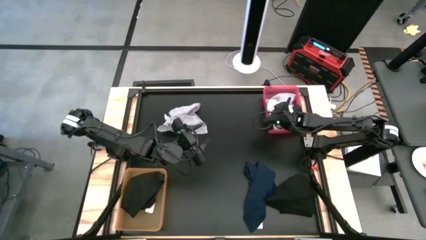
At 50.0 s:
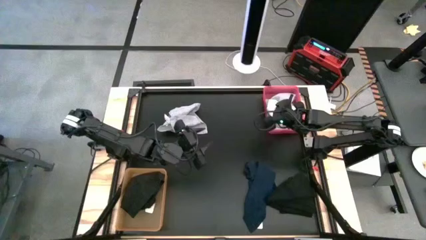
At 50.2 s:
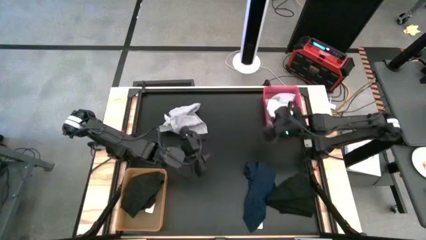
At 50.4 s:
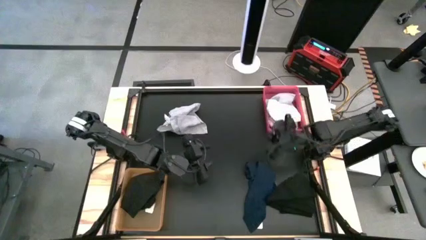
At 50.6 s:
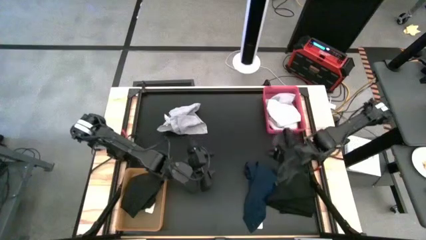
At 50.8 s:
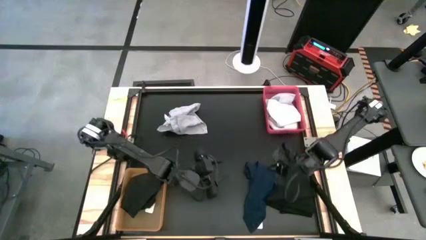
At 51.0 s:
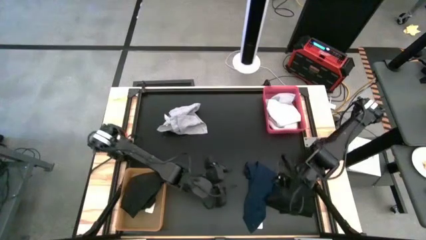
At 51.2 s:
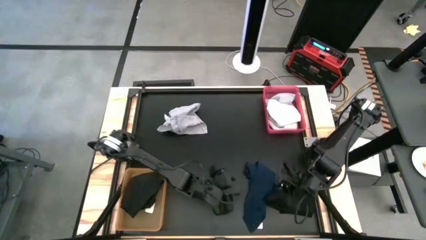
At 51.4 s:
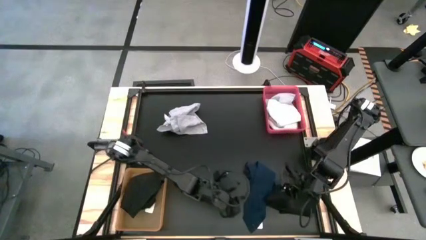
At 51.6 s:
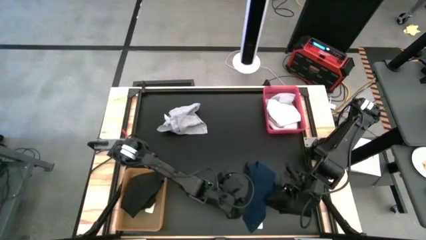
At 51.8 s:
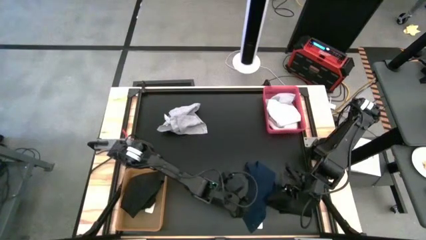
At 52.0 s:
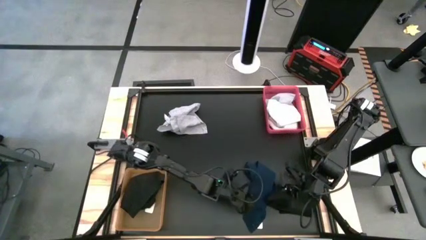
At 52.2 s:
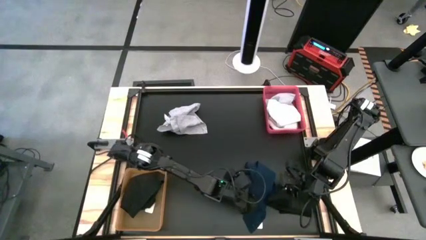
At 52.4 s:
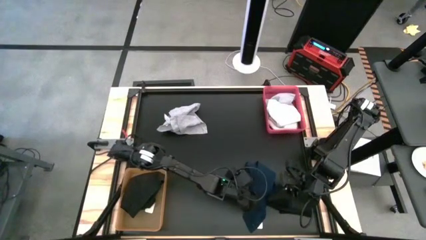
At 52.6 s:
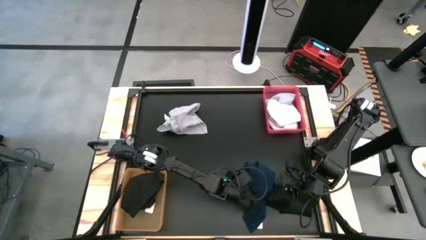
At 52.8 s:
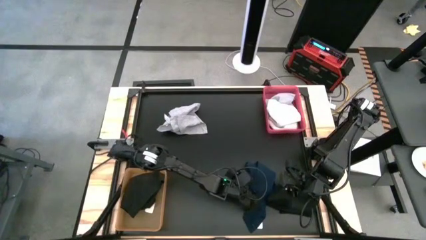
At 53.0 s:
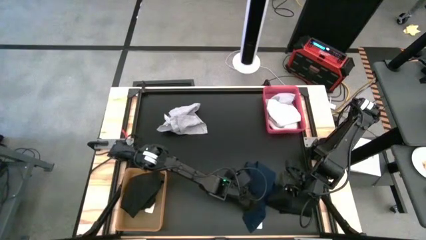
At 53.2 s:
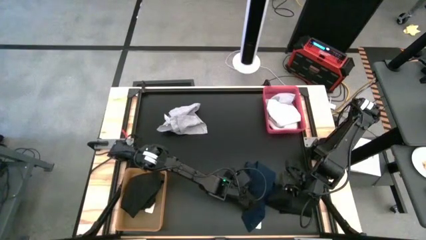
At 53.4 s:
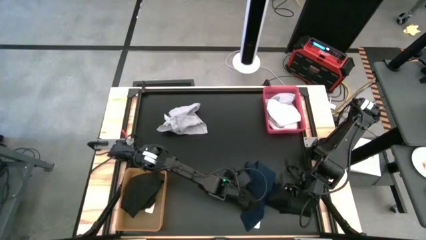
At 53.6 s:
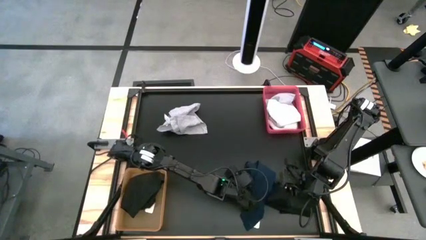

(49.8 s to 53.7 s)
Task: Sort towels by color in basket
Put the dark blue kitchen towel into the orange bin

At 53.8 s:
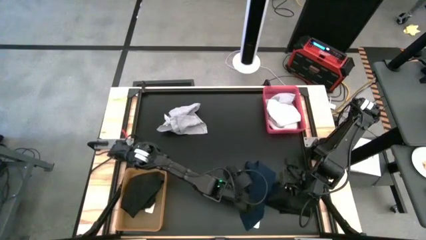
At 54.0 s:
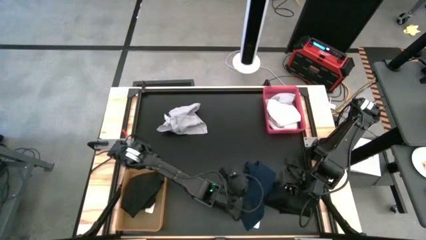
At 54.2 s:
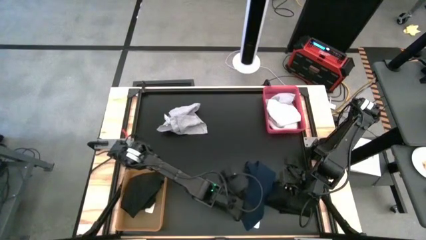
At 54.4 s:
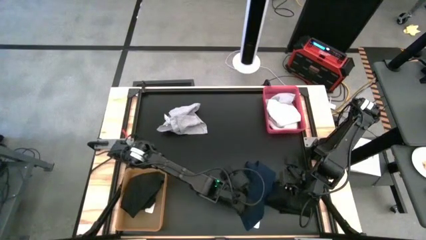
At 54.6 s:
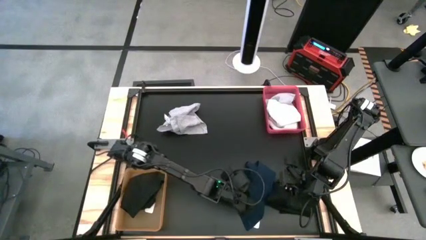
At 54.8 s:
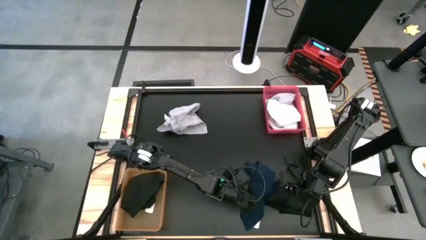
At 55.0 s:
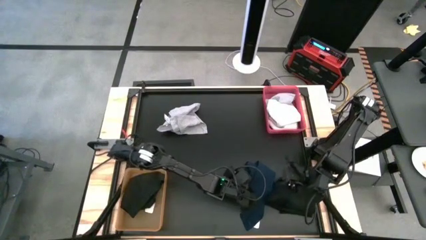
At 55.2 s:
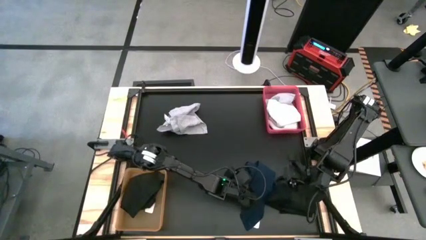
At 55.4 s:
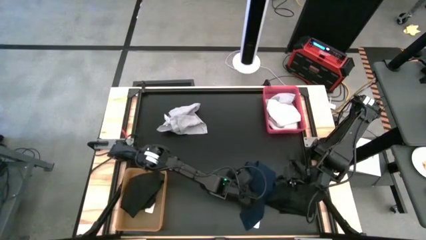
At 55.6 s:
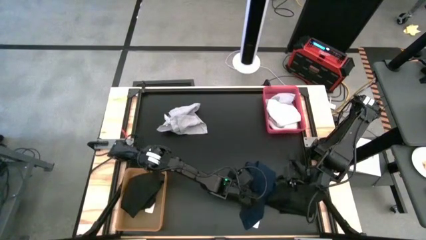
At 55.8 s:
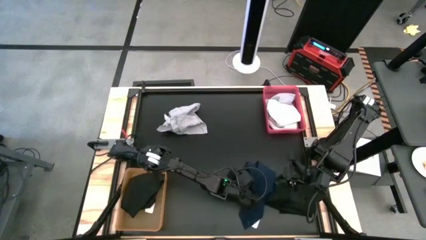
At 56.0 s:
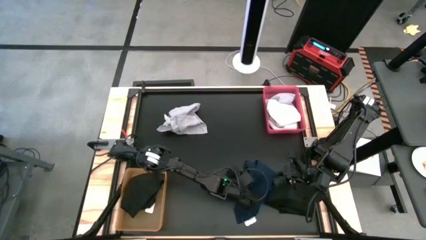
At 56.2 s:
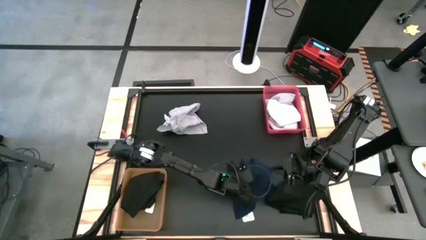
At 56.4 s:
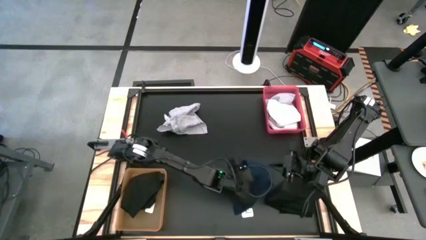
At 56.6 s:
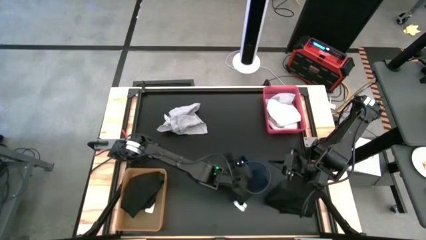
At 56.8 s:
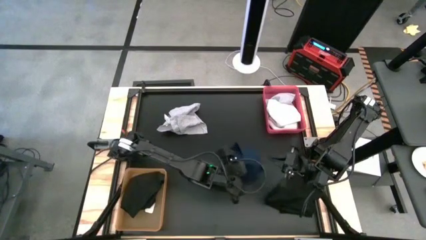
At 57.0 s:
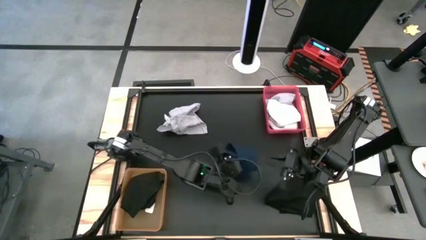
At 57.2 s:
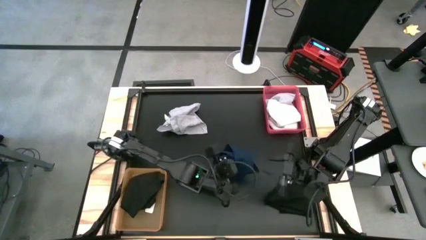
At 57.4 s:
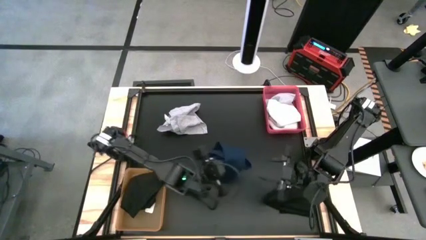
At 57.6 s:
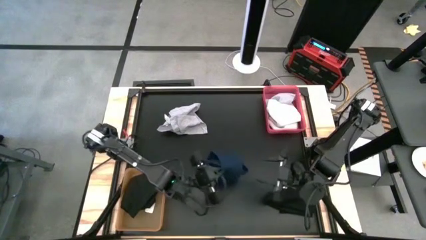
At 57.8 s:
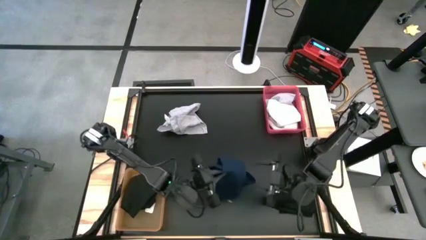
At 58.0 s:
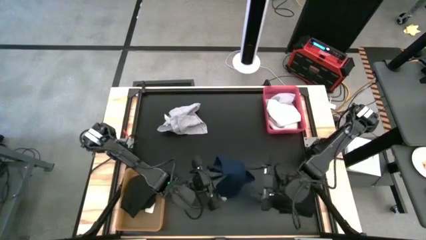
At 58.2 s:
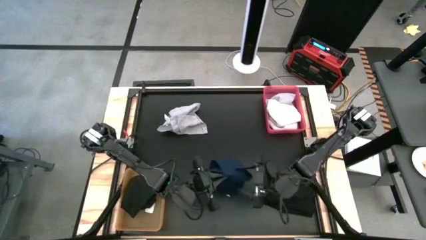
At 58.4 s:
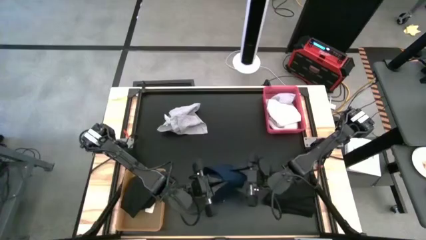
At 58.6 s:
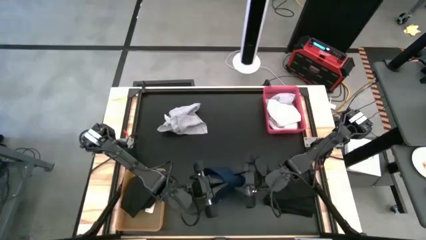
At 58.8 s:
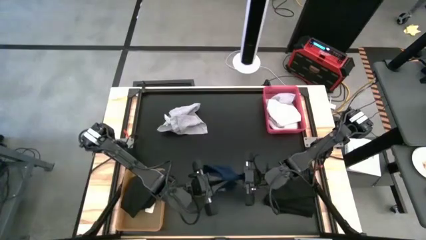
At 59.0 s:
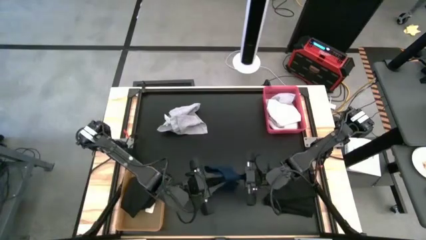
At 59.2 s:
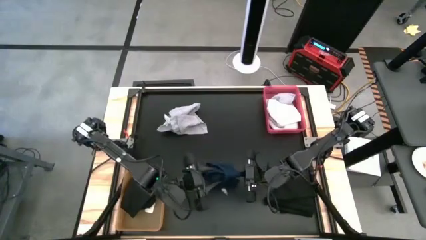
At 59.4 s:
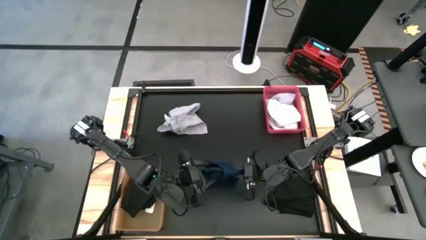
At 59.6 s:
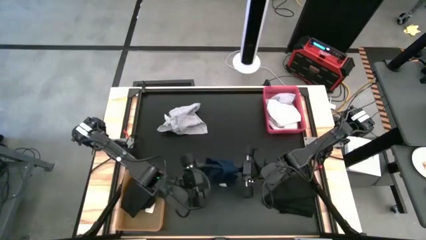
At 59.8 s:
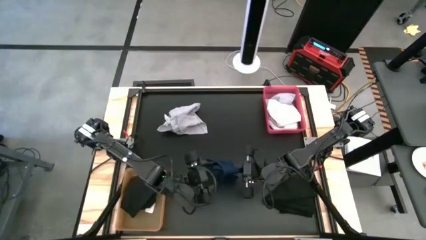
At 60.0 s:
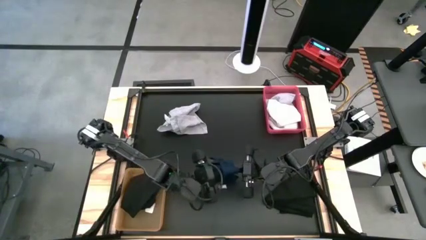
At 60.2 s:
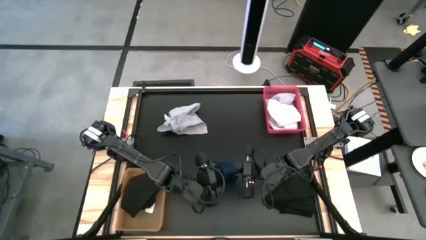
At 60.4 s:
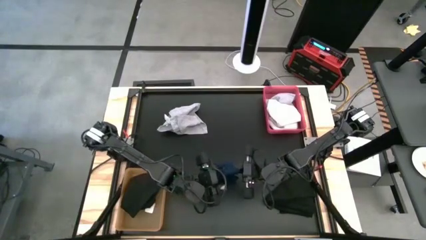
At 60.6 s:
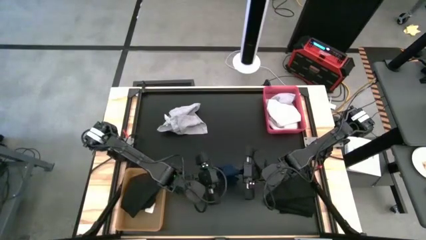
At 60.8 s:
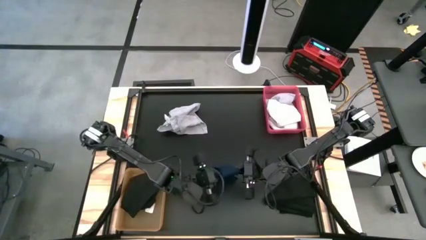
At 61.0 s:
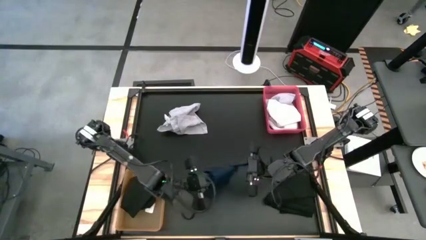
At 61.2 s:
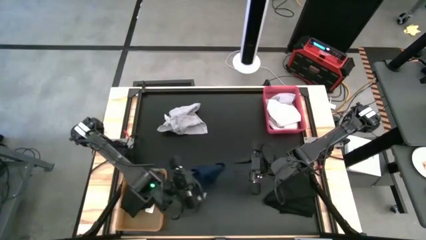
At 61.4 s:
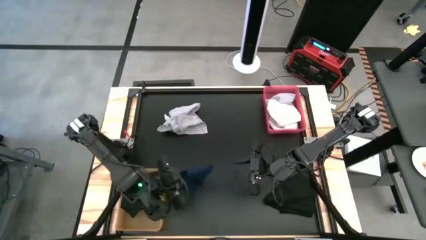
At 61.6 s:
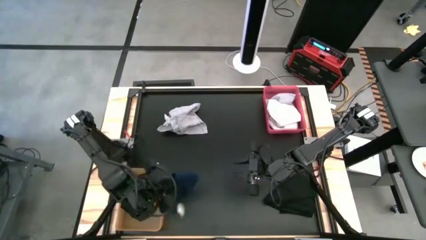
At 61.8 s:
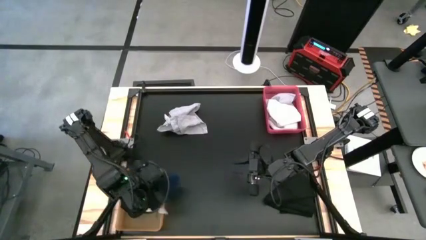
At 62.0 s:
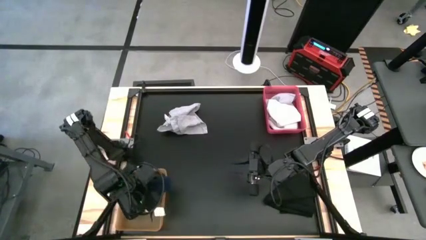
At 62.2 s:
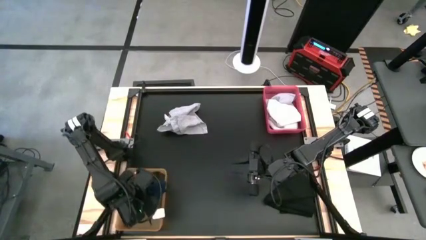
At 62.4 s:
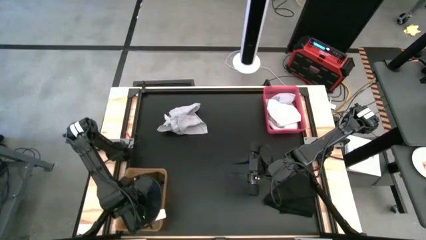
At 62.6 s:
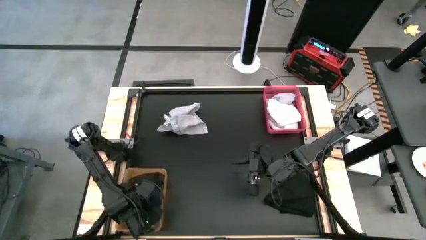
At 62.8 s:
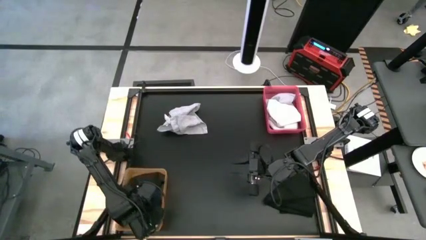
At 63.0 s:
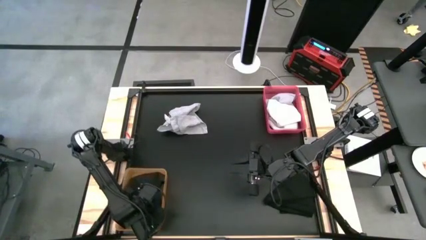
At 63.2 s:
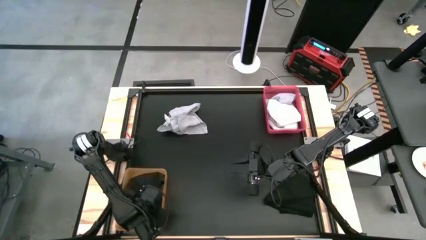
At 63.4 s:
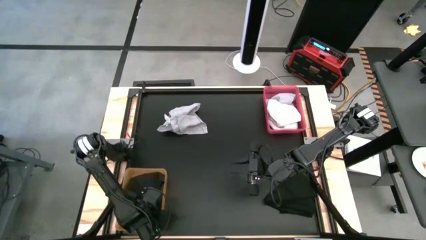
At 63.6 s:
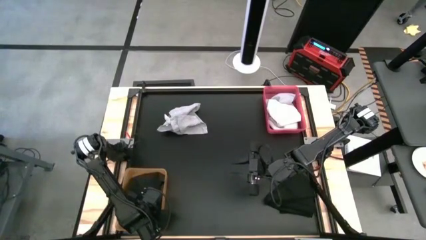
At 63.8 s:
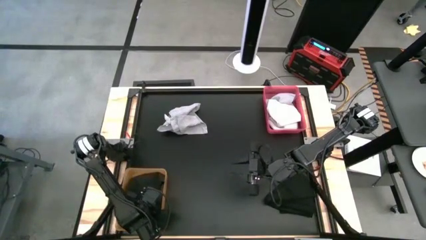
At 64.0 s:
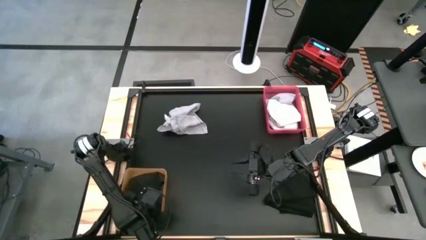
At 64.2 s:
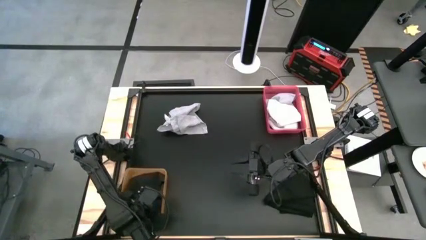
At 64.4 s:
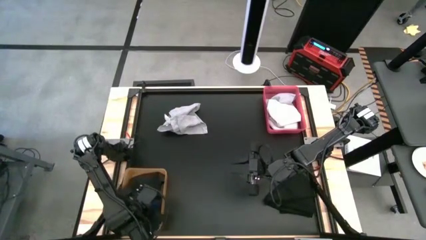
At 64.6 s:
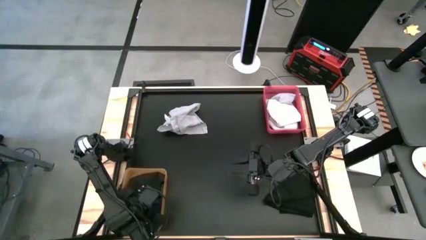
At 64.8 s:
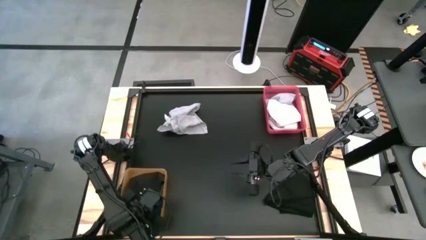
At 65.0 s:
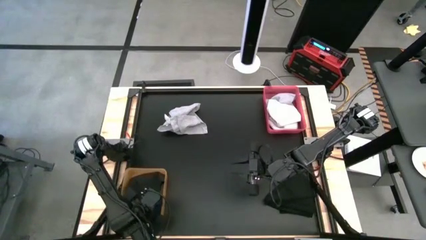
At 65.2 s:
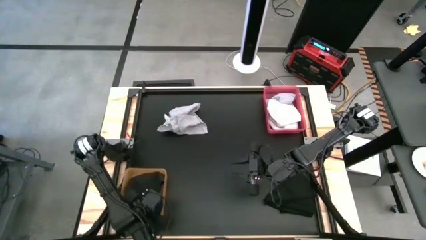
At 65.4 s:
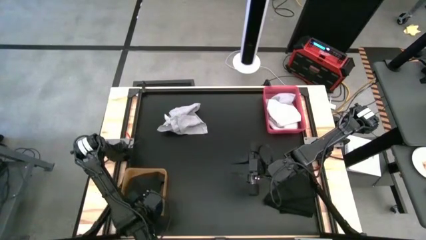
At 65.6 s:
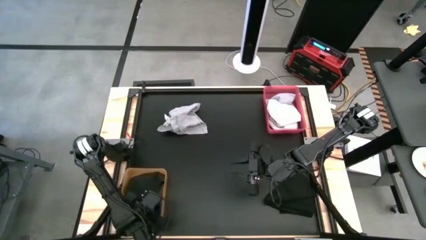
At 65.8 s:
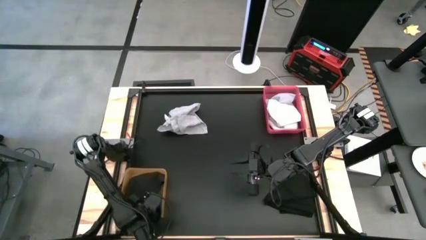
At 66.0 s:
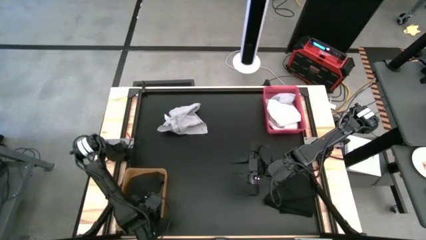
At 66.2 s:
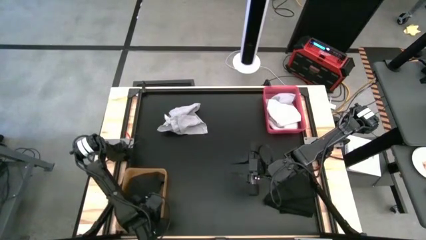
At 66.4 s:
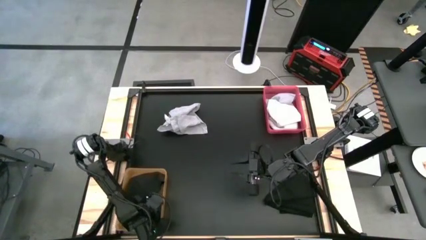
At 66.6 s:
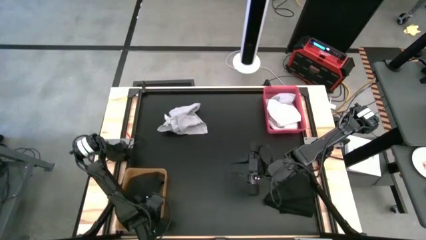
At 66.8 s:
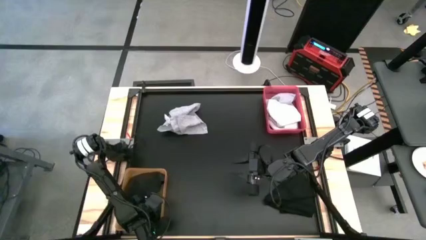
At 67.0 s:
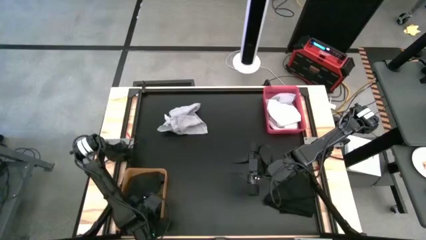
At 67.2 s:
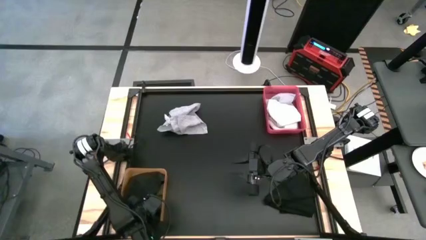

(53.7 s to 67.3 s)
Put the dark blue kitchen towel into the orange bin
